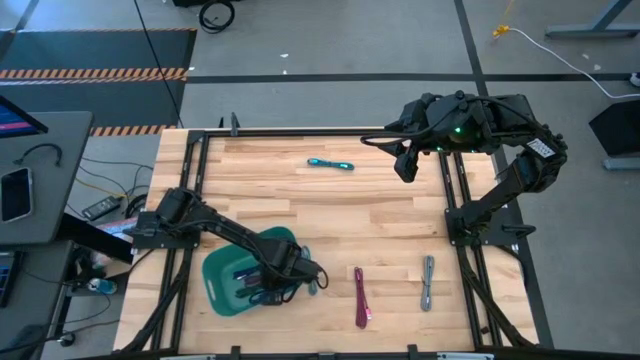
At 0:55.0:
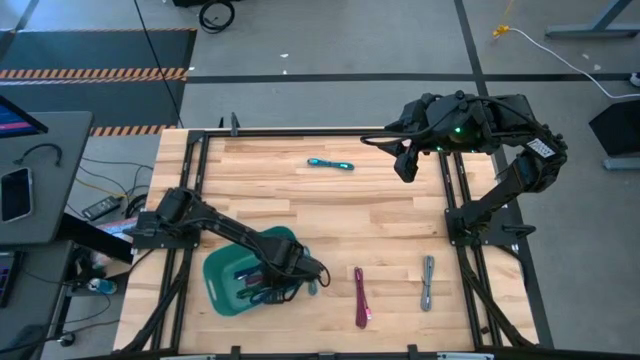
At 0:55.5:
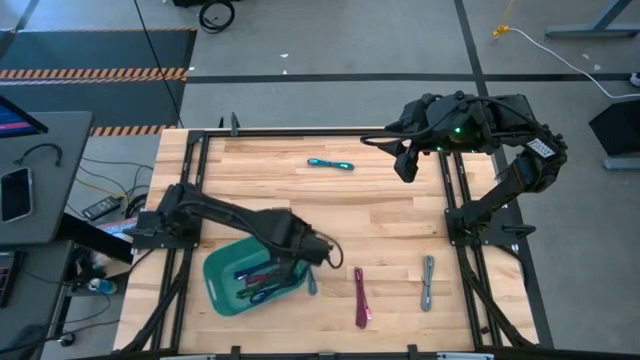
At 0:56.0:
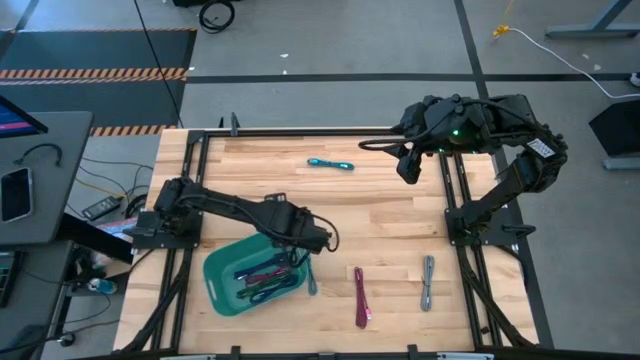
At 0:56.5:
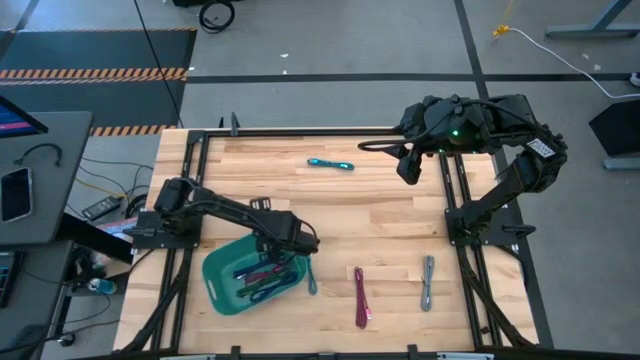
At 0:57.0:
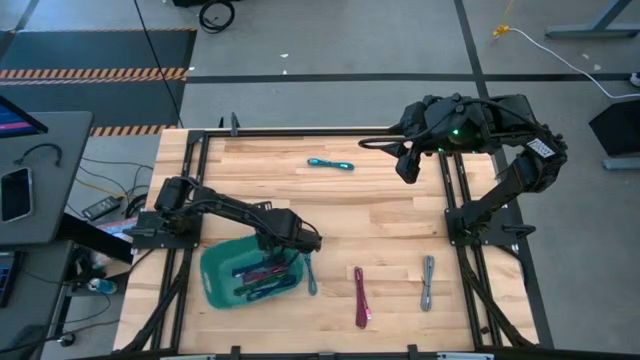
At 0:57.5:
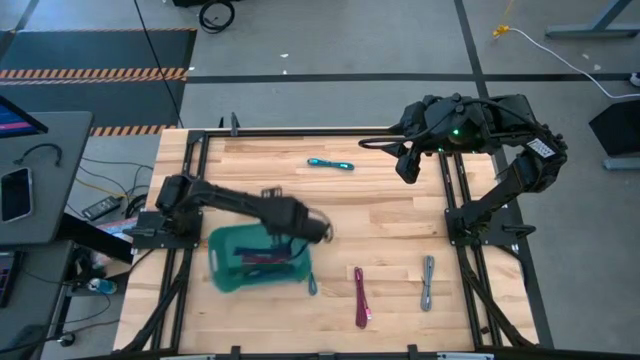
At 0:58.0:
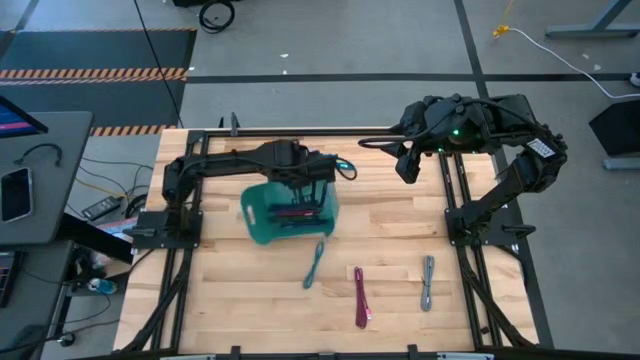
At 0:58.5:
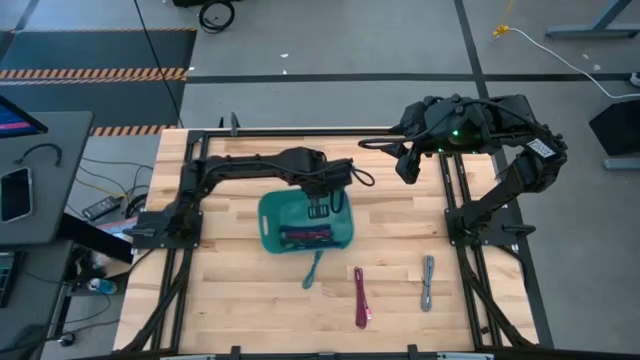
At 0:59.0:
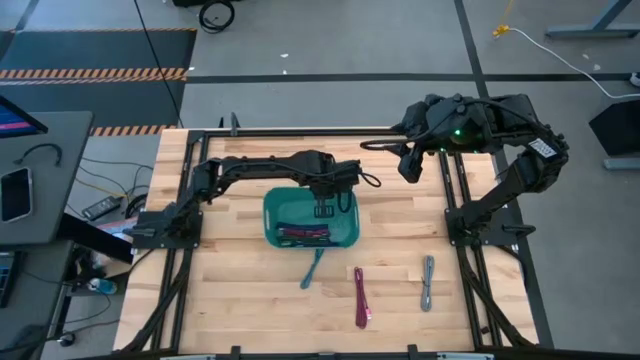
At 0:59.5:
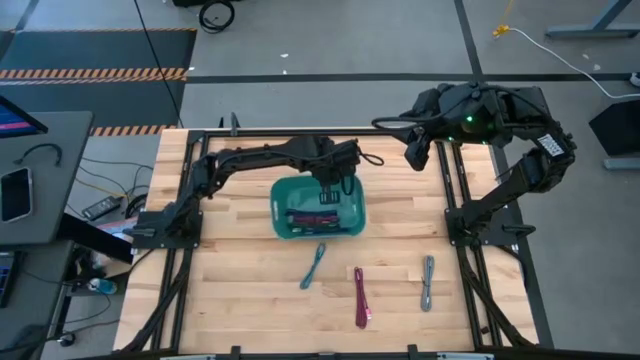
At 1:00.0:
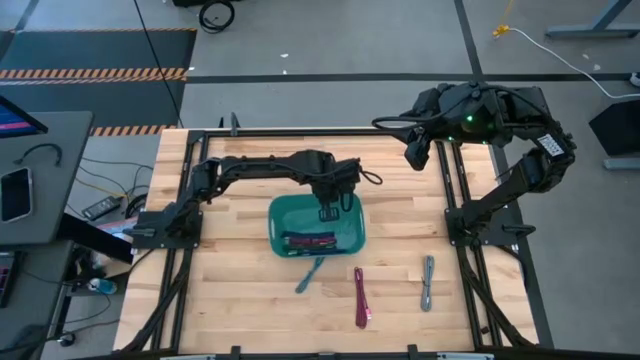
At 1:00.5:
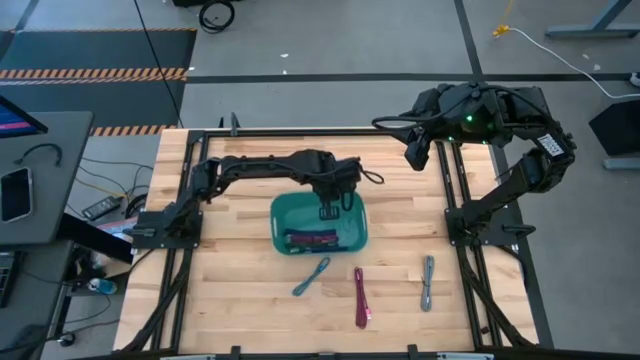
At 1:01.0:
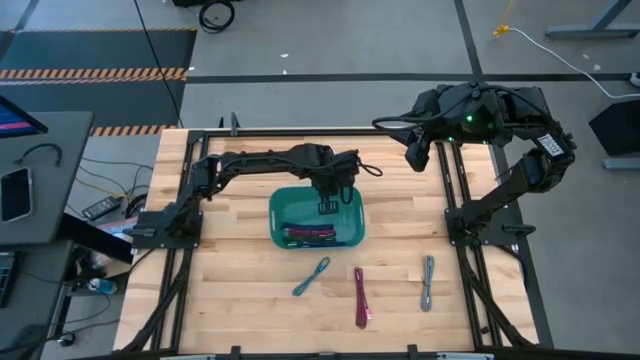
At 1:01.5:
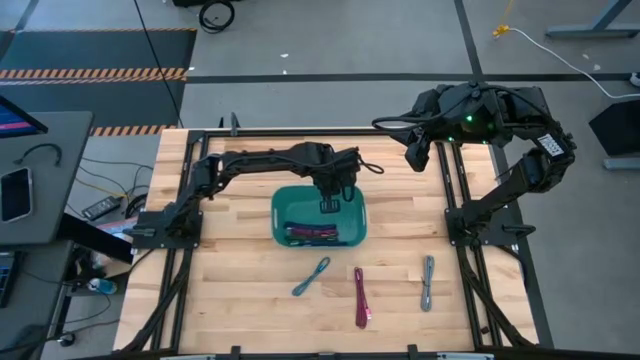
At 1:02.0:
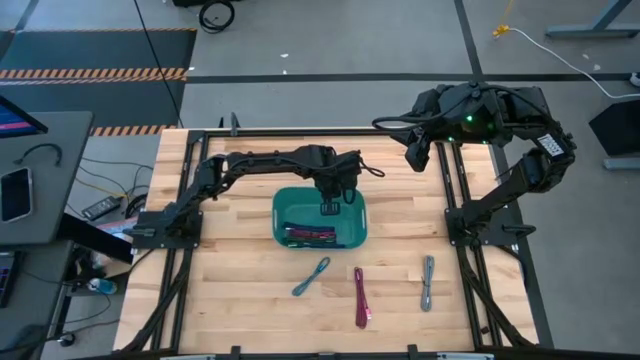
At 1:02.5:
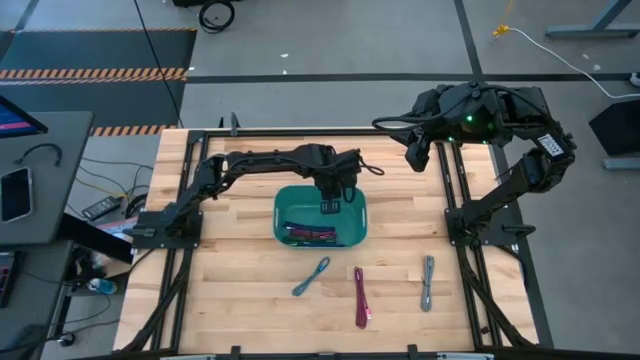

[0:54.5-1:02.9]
Task: Pick and place USB-C Cables
Move the green bin to the center of the table

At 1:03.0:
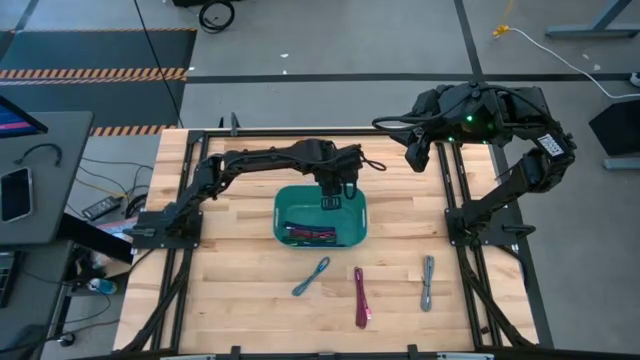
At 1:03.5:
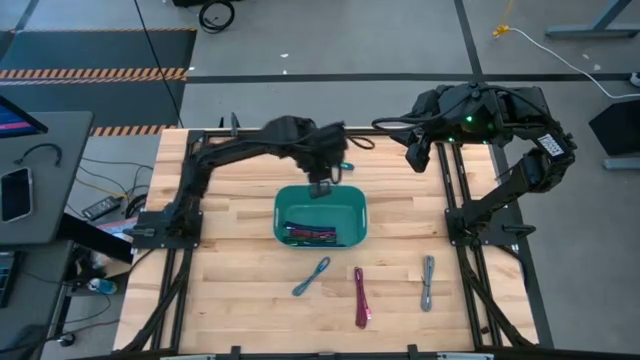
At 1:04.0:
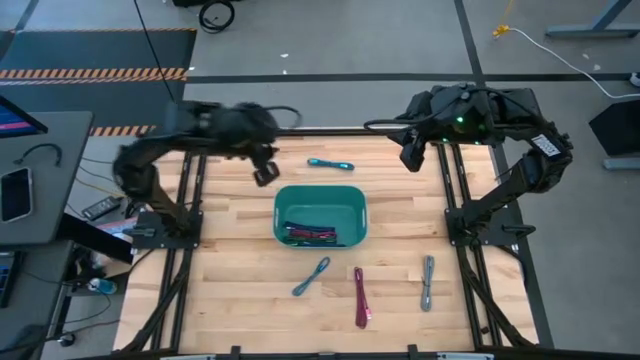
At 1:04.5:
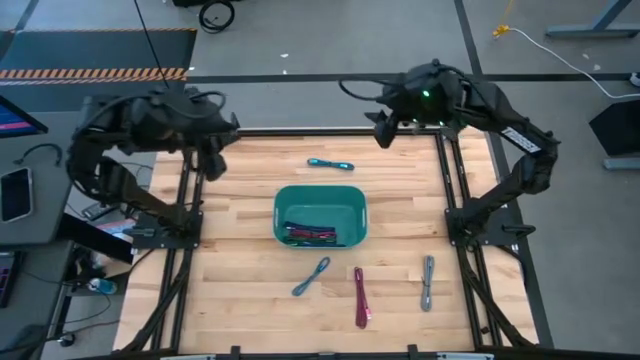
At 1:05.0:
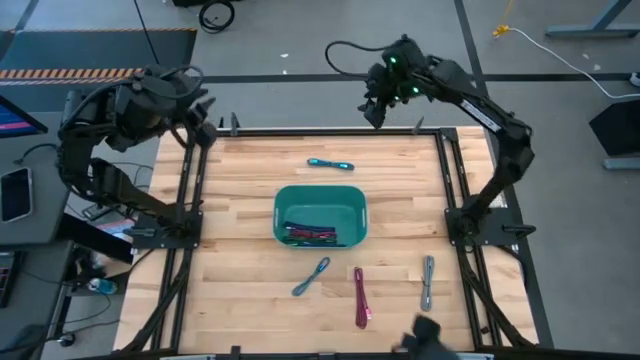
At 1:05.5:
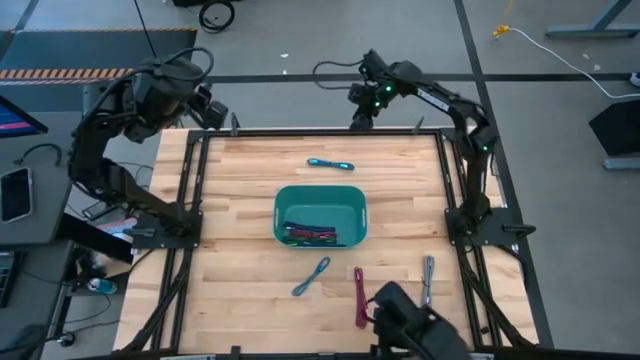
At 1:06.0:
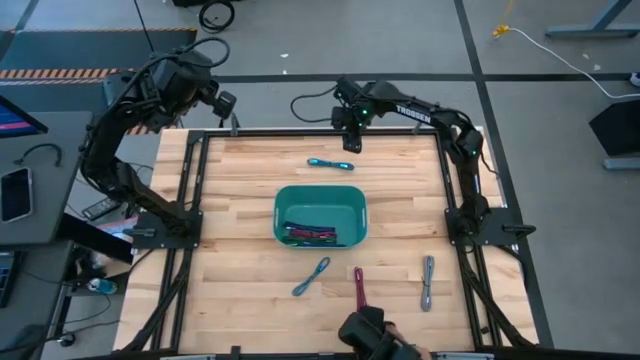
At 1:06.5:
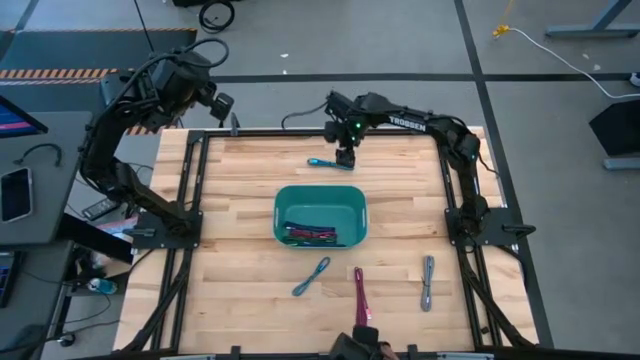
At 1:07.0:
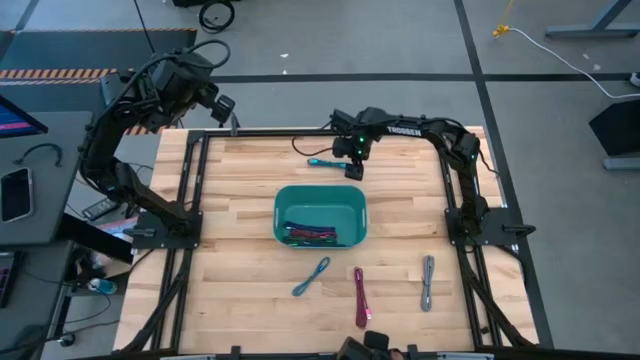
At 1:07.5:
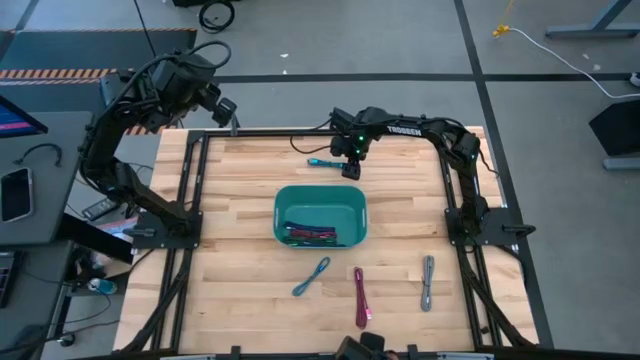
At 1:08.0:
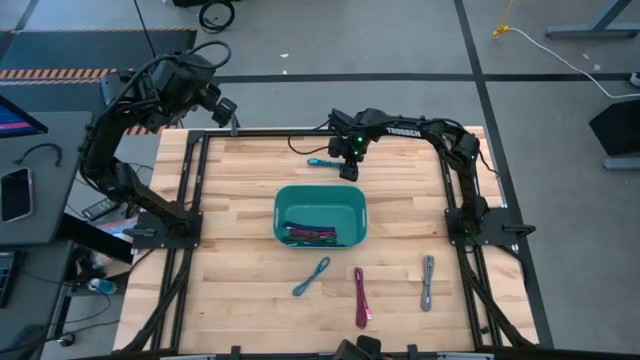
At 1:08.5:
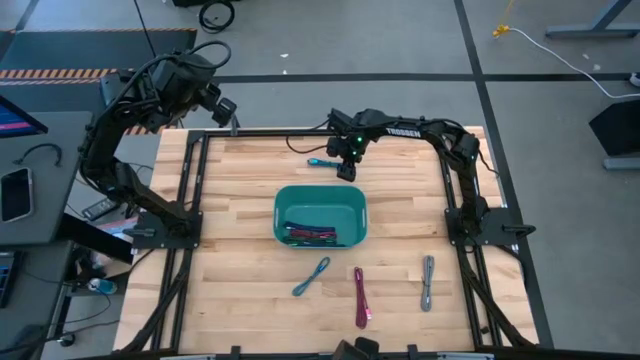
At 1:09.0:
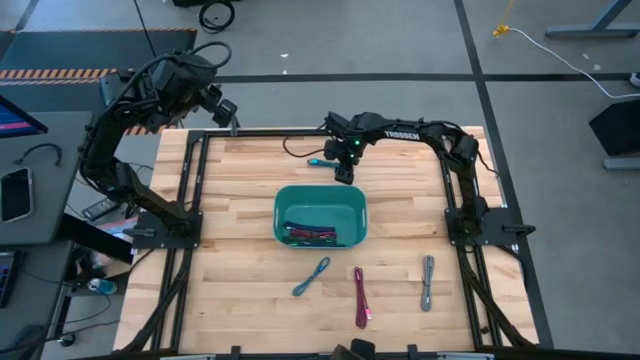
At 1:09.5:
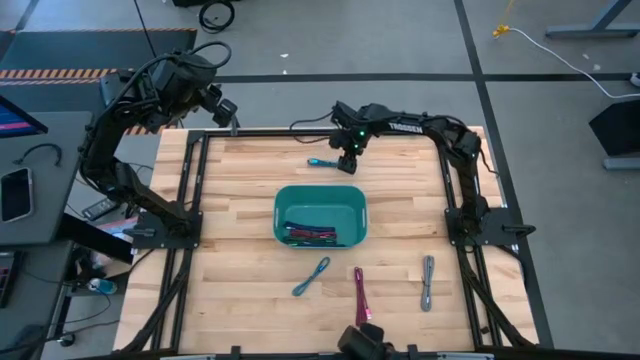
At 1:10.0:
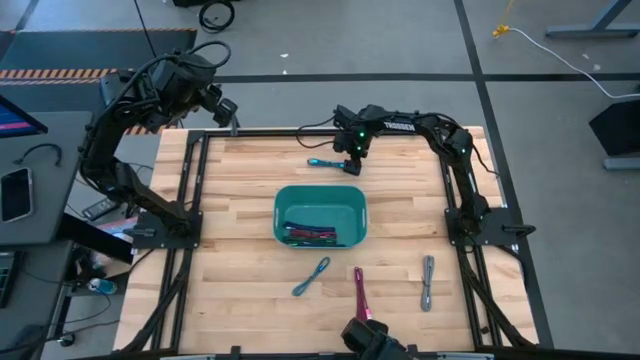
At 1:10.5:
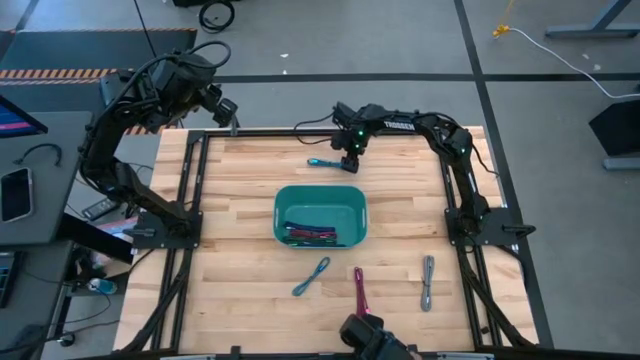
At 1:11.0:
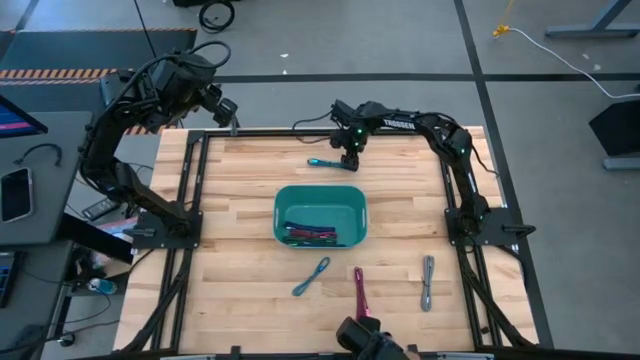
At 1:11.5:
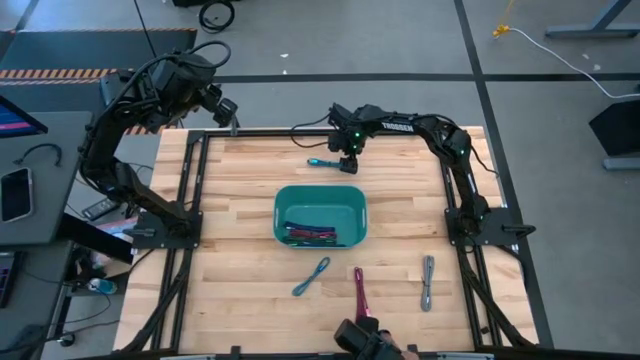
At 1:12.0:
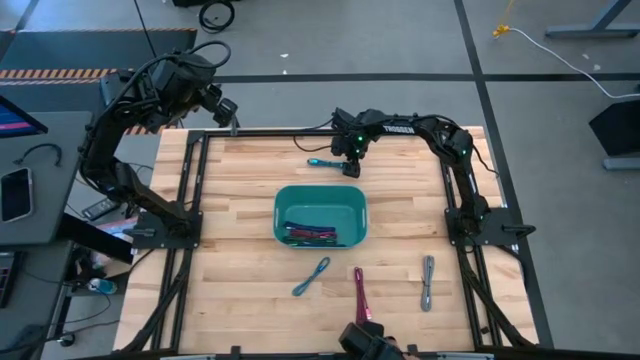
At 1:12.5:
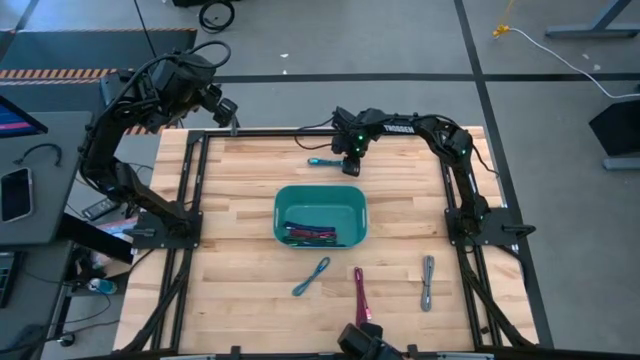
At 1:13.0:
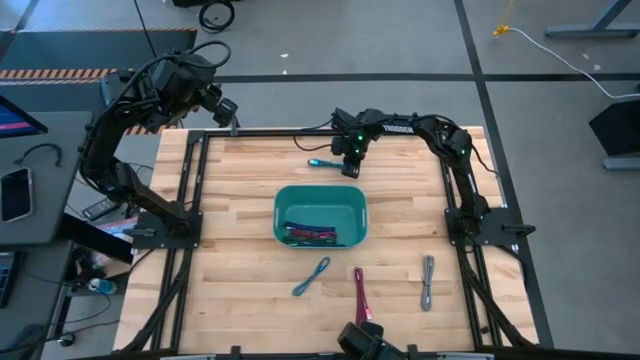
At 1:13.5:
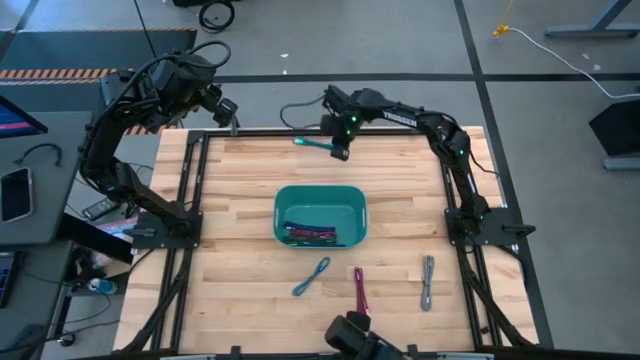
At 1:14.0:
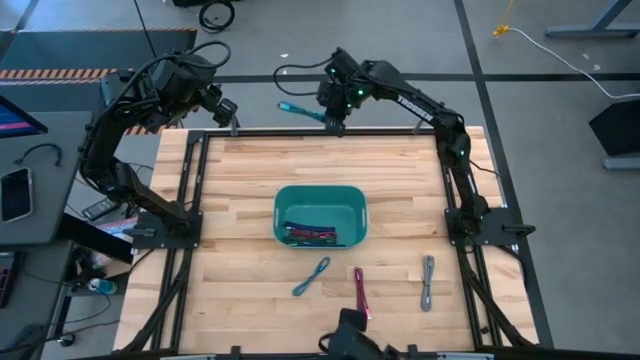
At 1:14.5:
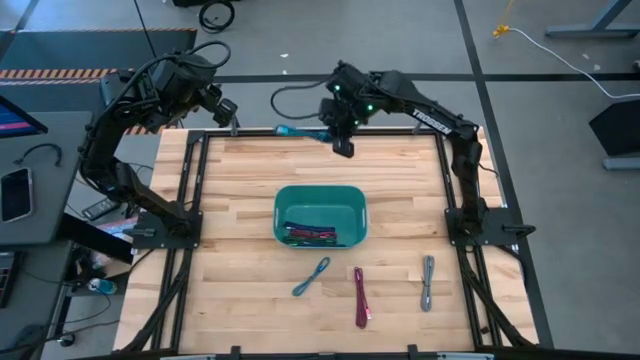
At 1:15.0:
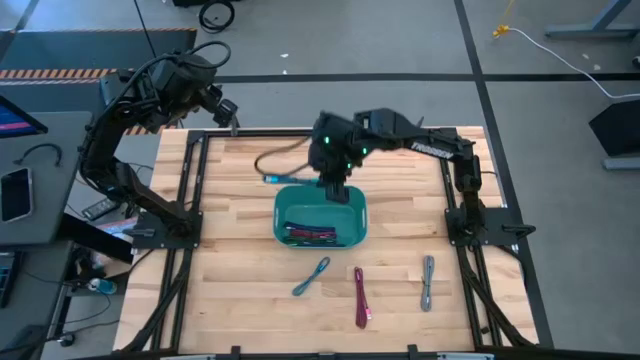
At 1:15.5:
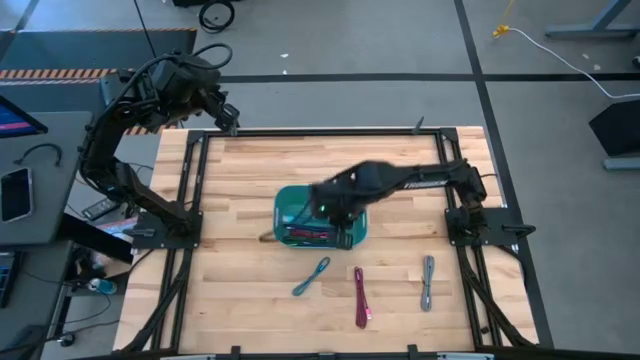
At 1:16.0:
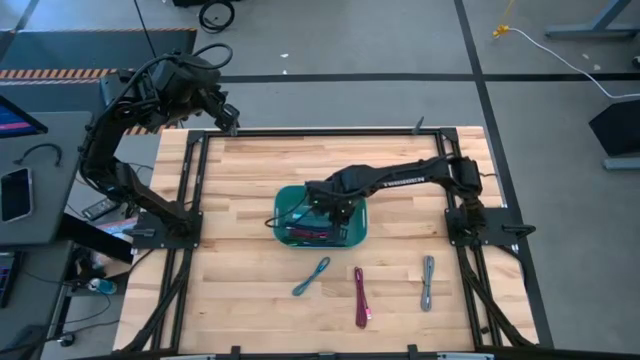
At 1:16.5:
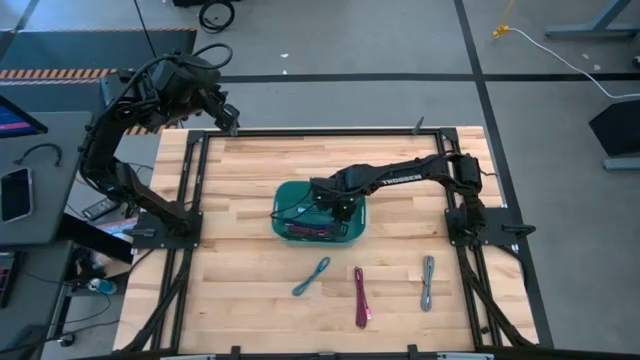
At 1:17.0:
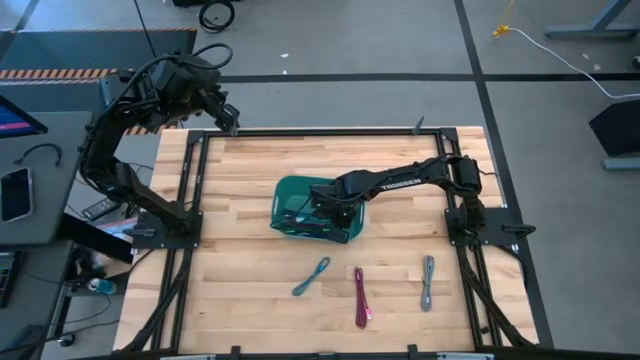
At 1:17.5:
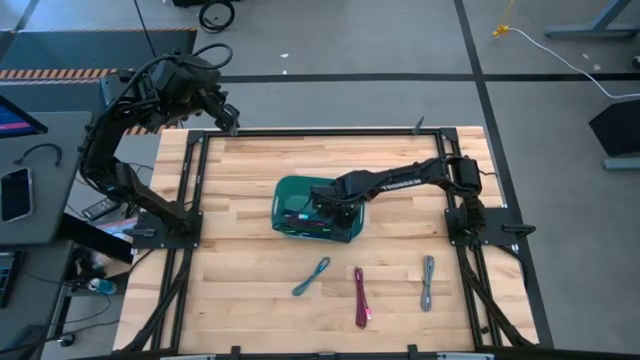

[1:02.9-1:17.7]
Put the top light blue charger cable into the green bin
